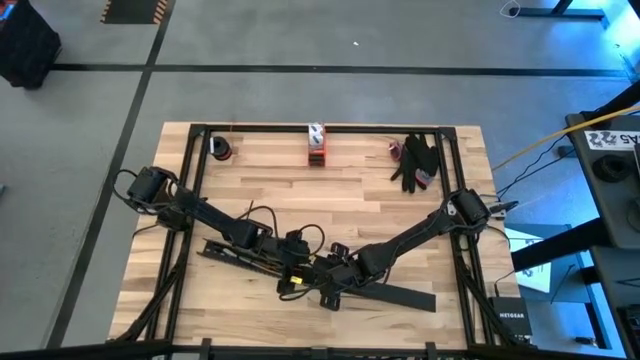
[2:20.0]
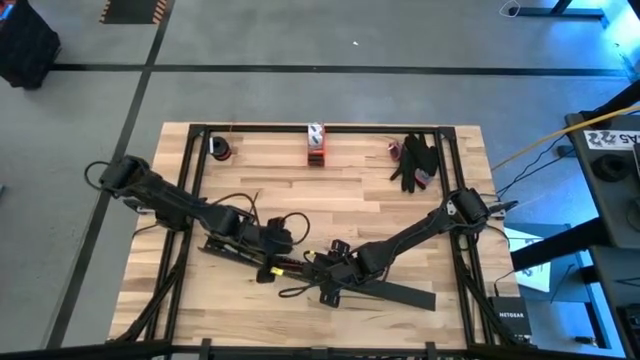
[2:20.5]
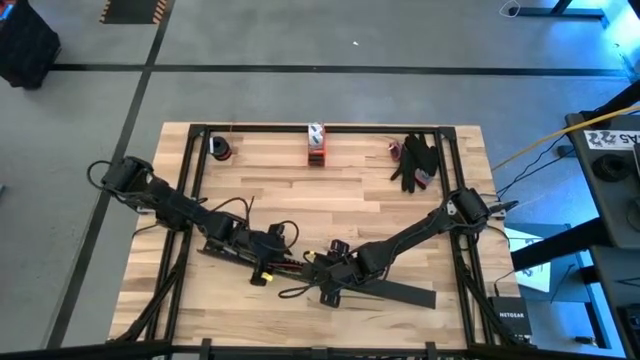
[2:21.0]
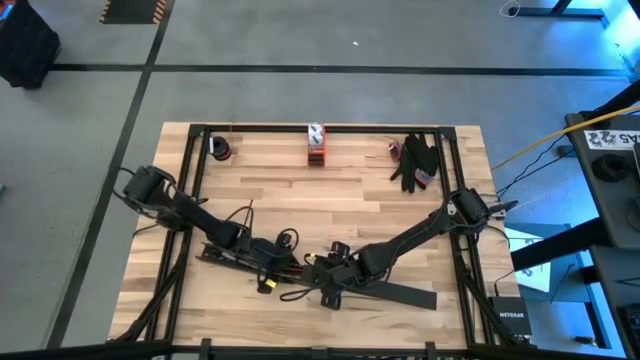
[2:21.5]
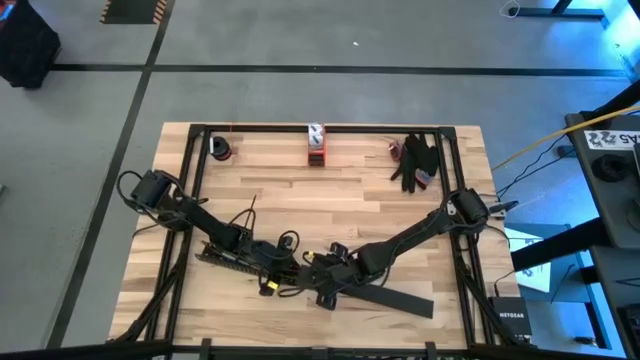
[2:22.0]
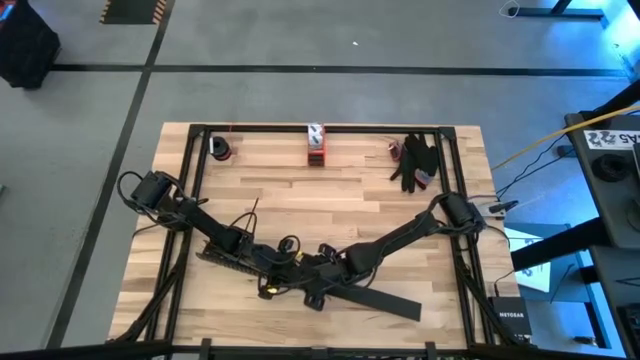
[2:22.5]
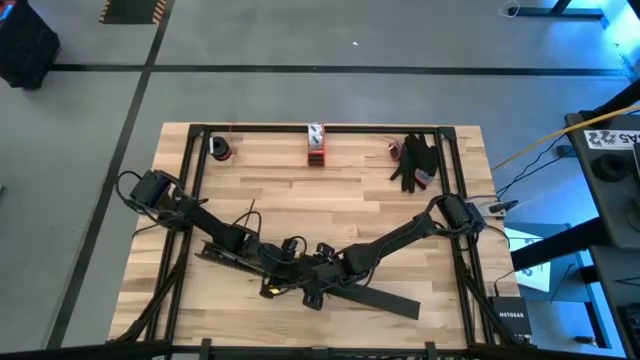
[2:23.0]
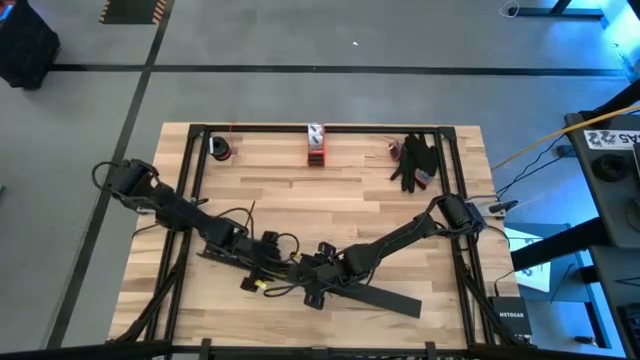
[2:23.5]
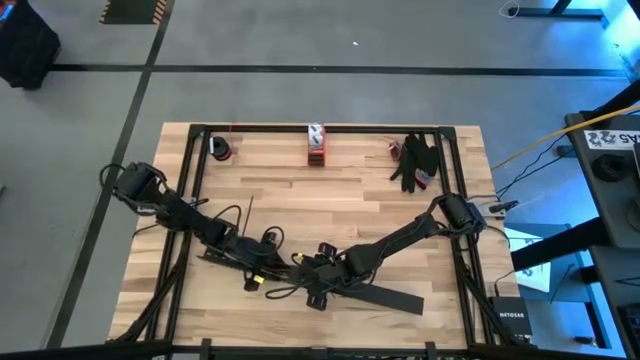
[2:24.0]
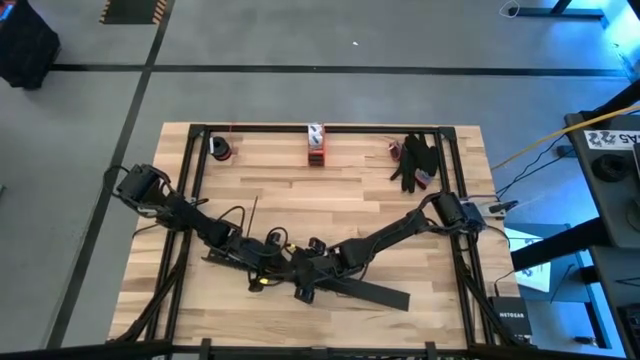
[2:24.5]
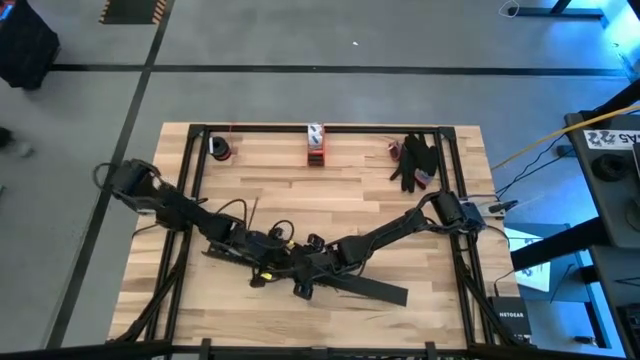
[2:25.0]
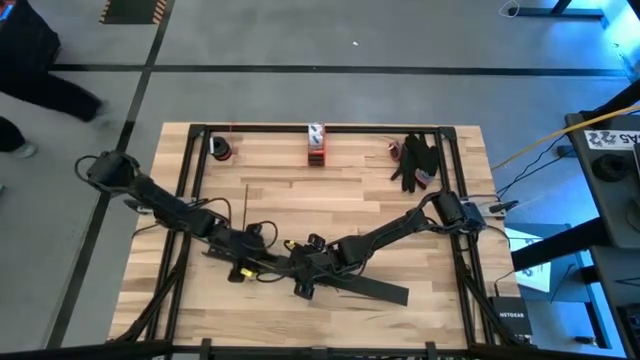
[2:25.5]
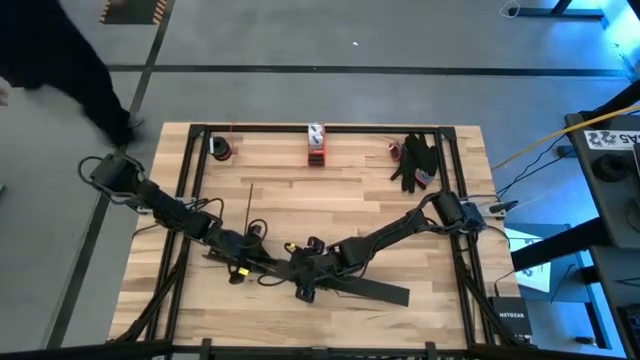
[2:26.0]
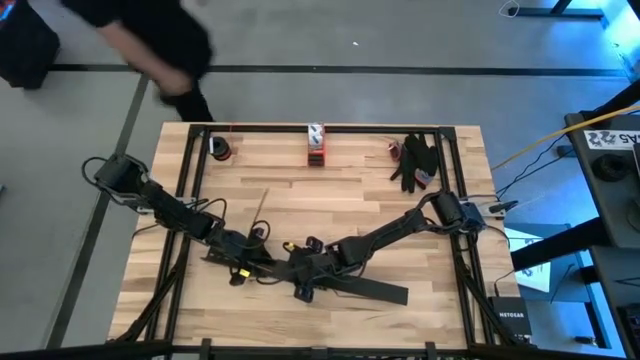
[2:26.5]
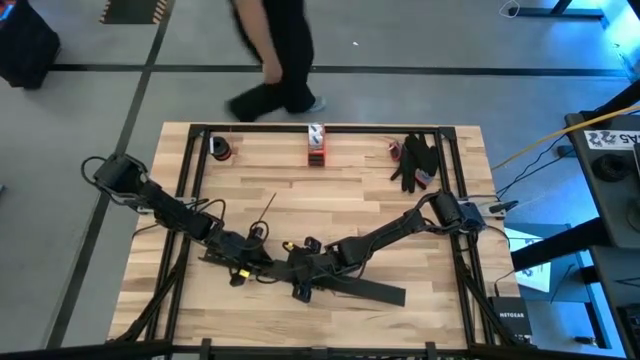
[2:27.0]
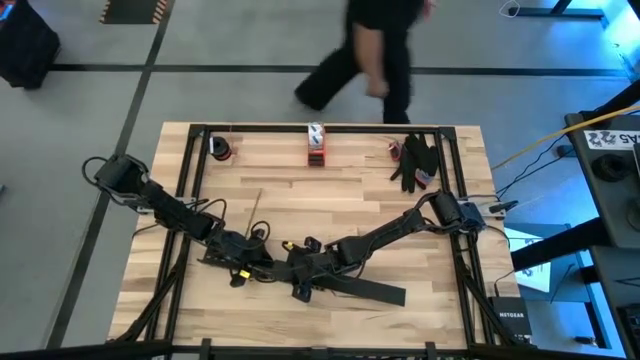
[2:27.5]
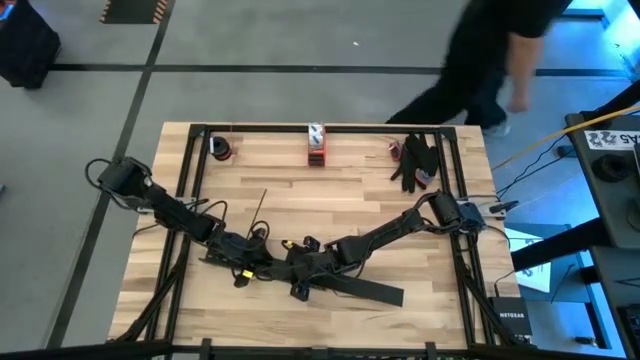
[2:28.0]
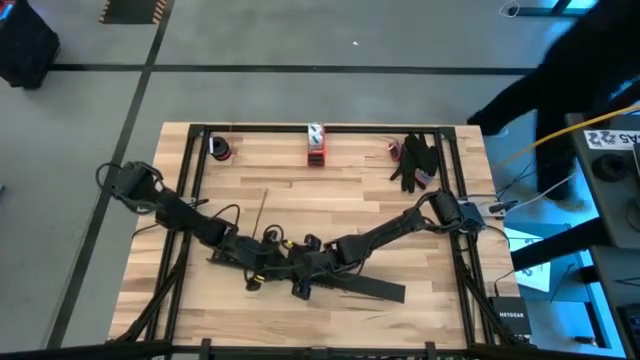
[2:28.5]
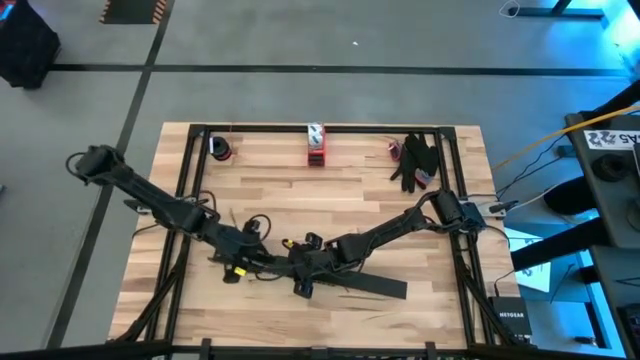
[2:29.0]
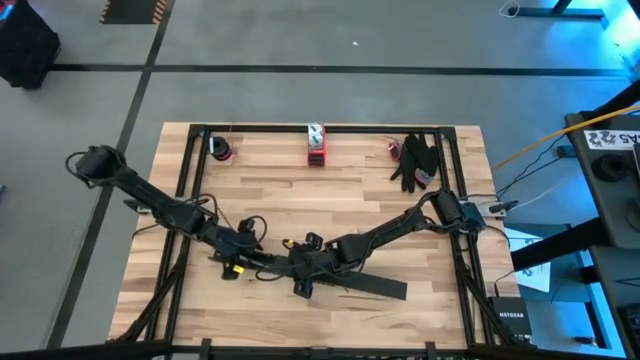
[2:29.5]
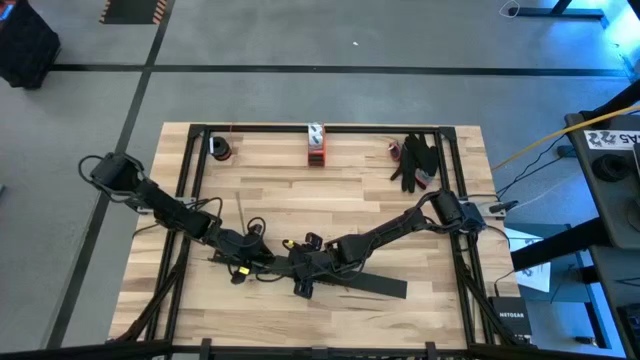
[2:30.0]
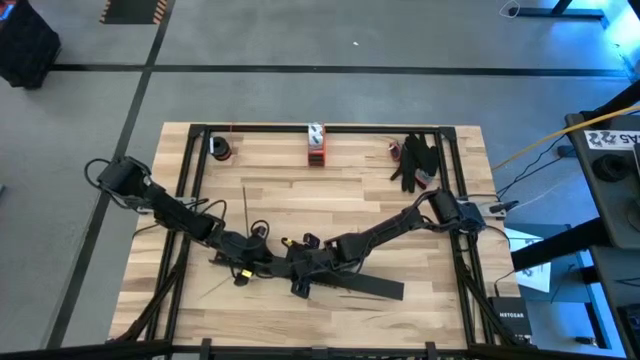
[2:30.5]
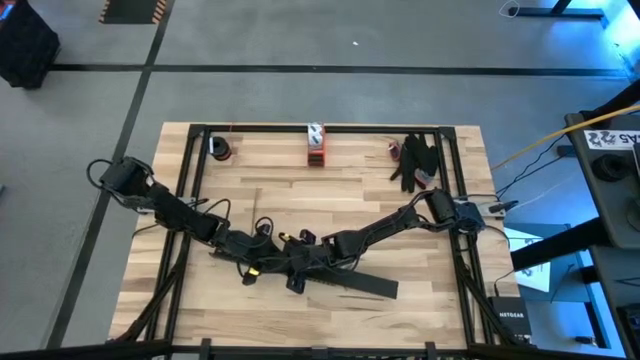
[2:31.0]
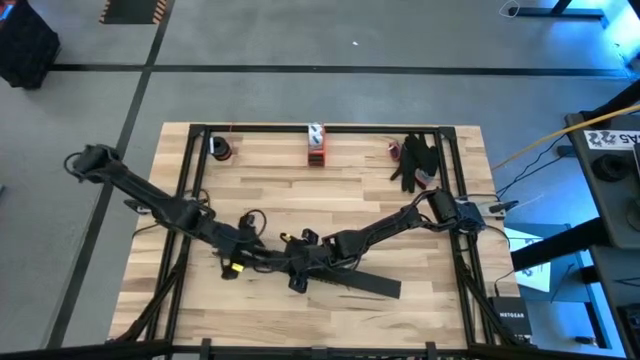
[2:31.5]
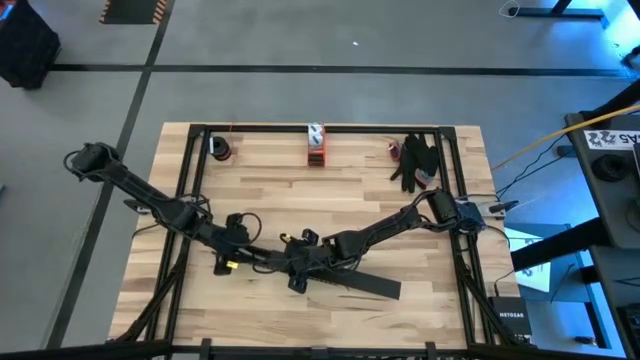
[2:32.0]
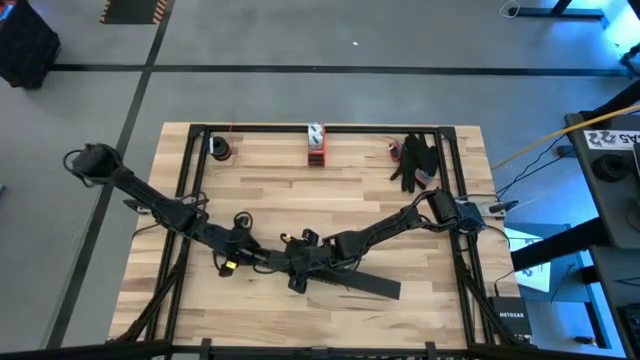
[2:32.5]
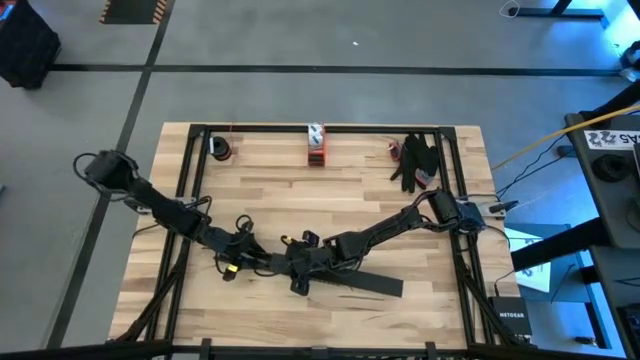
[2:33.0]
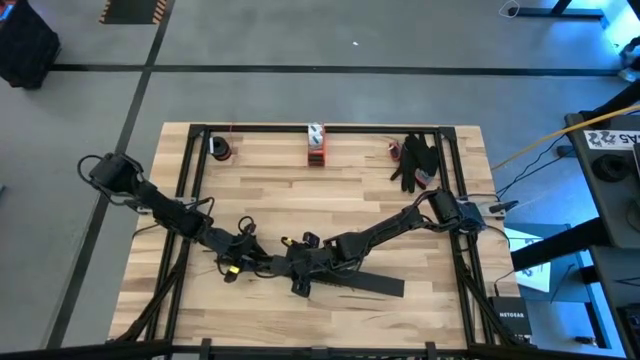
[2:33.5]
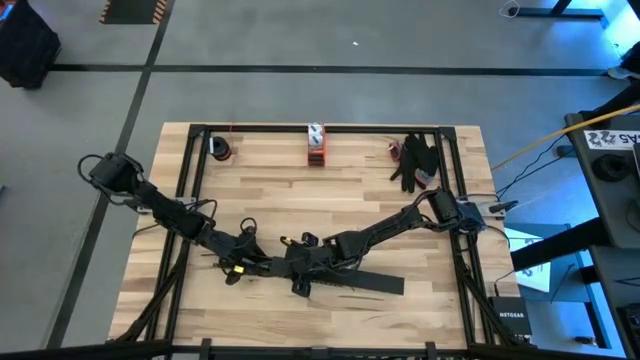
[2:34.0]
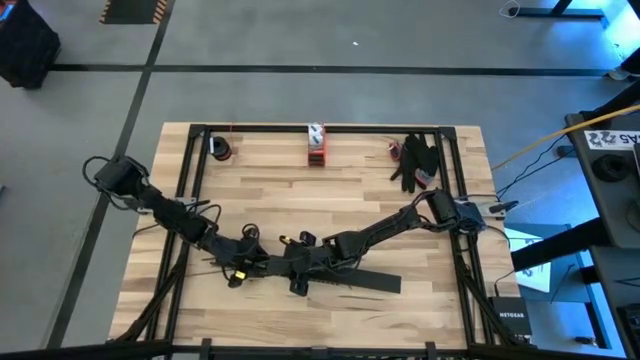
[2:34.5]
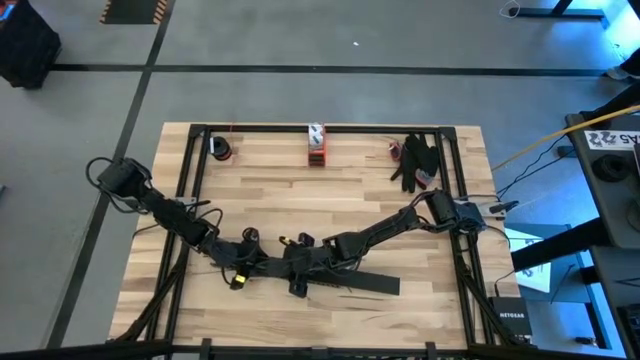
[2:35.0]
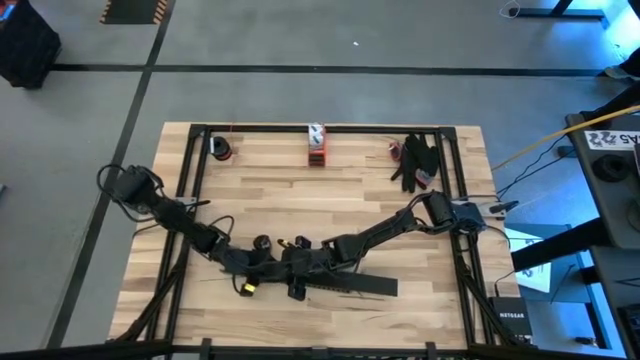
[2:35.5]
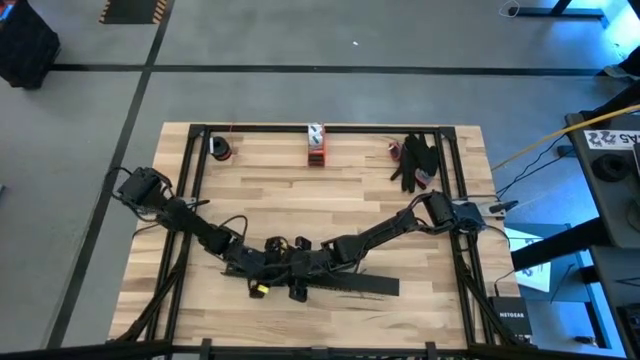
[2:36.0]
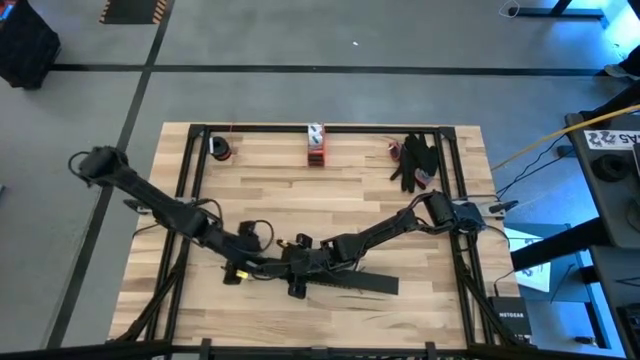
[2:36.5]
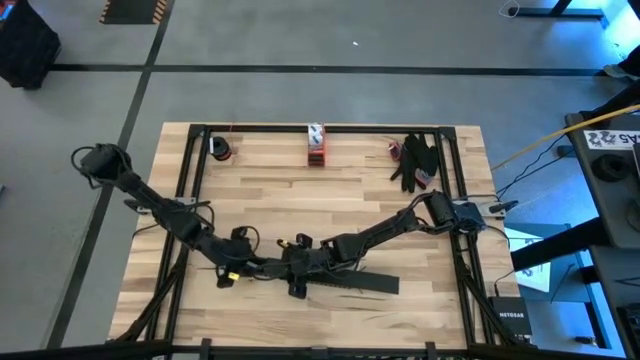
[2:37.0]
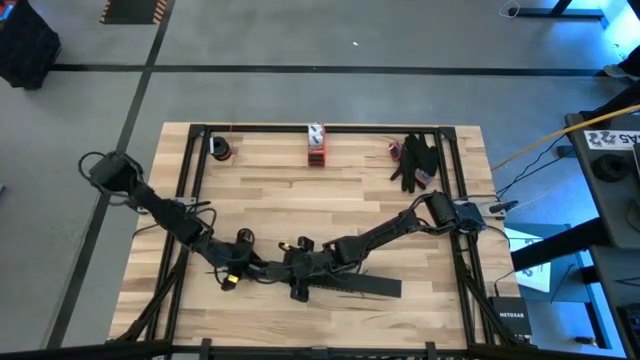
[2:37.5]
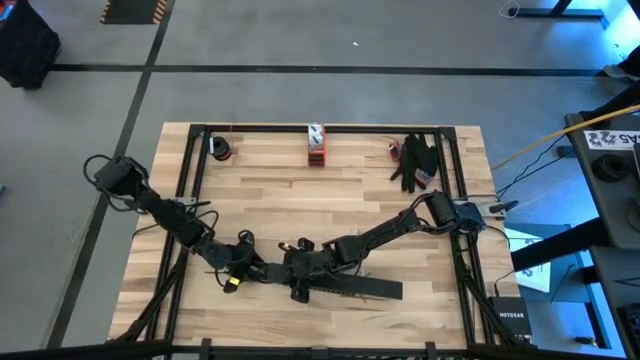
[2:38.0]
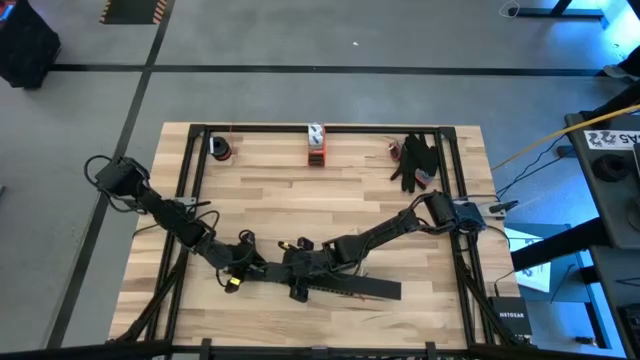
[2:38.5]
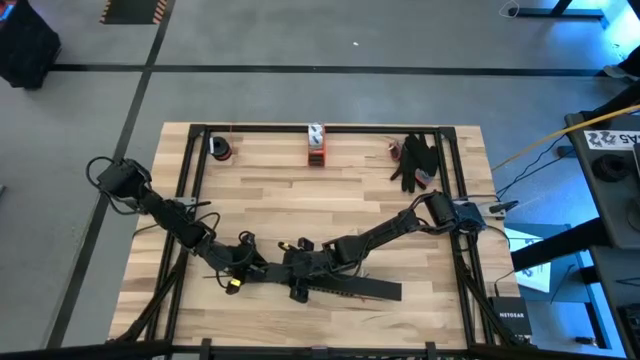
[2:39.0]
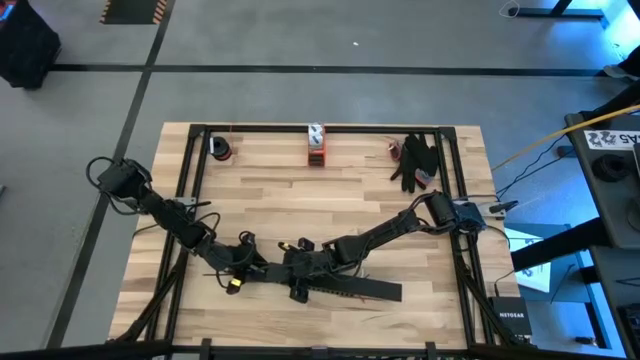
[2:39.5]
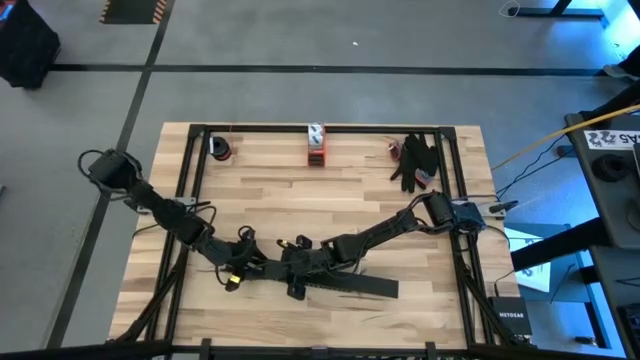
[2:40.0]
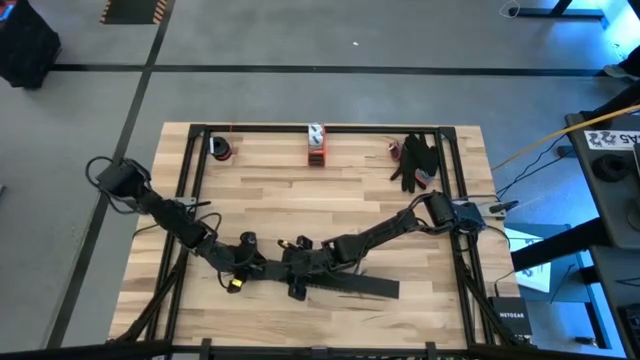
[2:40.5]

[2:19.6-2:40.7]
Task: Ziptie cables
Insert the black cover of the black cable duct
